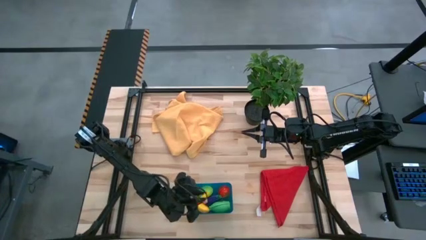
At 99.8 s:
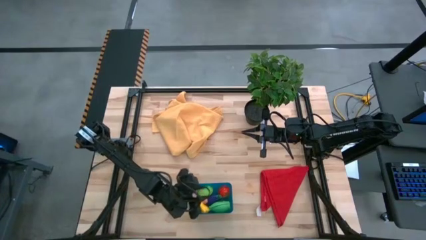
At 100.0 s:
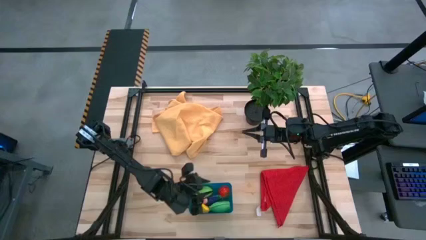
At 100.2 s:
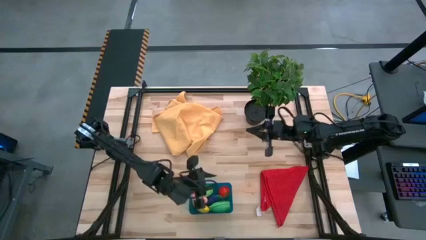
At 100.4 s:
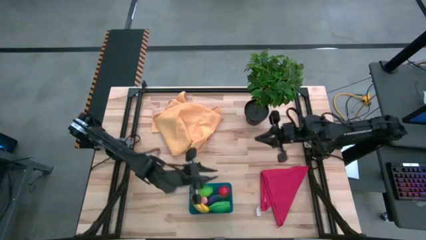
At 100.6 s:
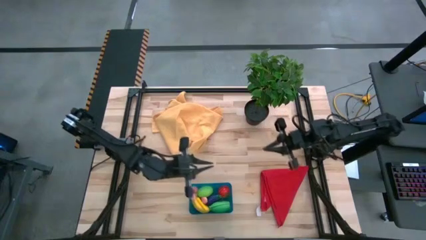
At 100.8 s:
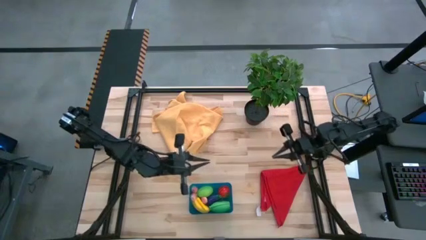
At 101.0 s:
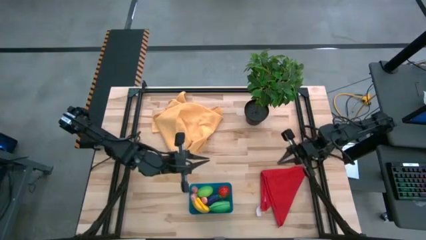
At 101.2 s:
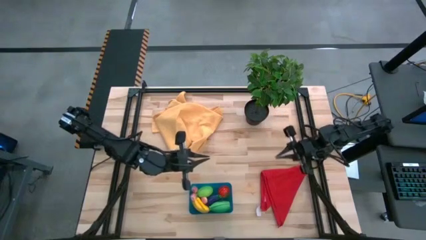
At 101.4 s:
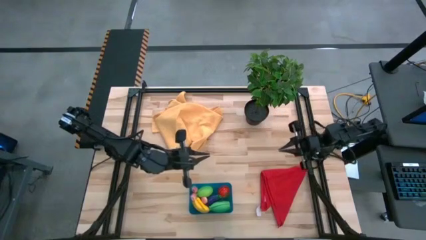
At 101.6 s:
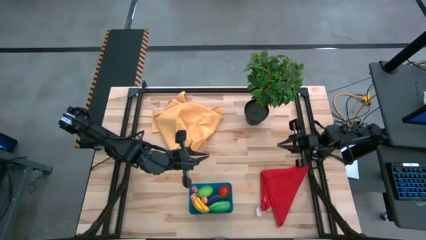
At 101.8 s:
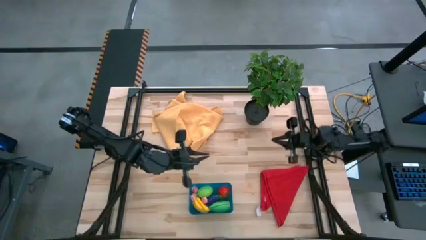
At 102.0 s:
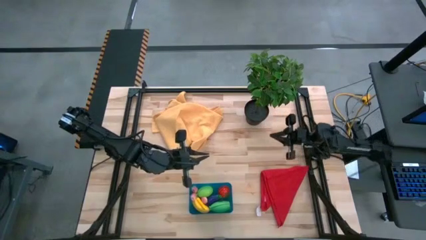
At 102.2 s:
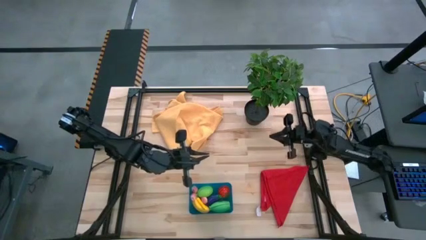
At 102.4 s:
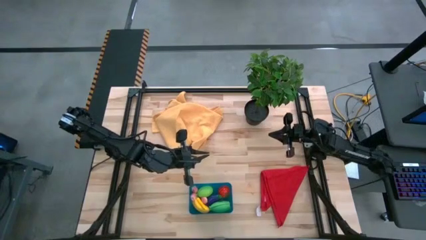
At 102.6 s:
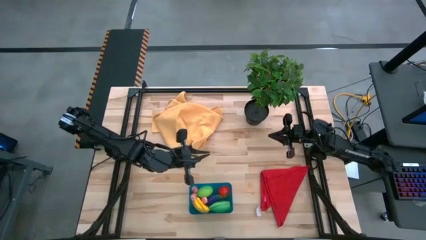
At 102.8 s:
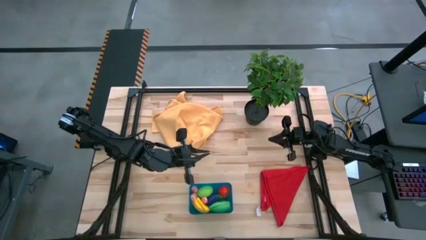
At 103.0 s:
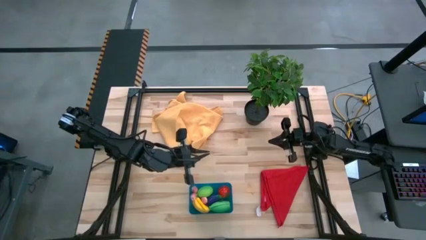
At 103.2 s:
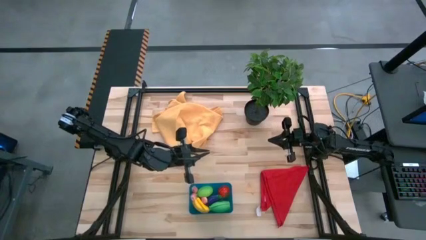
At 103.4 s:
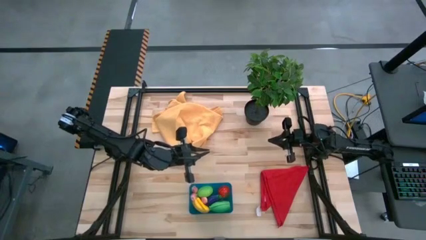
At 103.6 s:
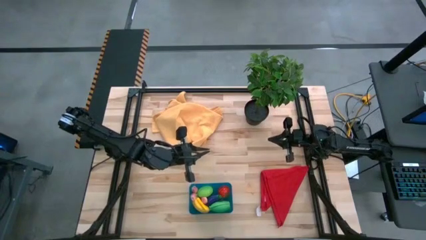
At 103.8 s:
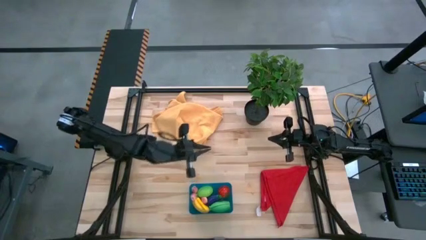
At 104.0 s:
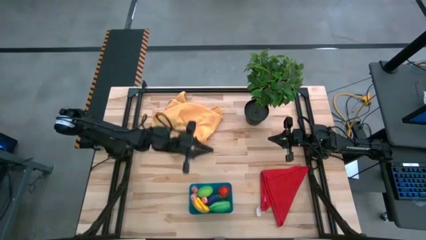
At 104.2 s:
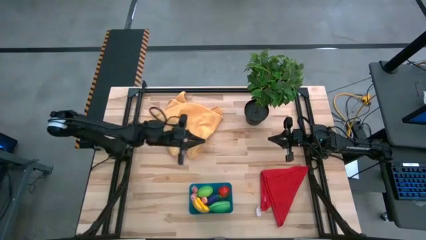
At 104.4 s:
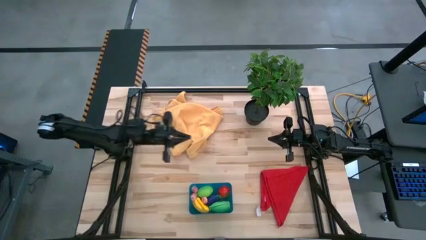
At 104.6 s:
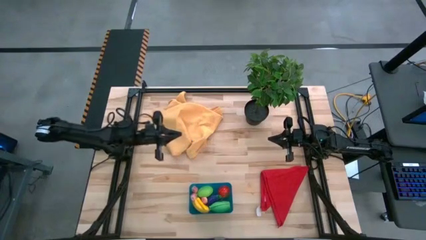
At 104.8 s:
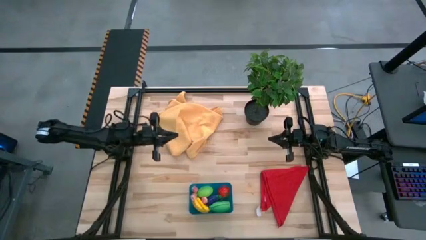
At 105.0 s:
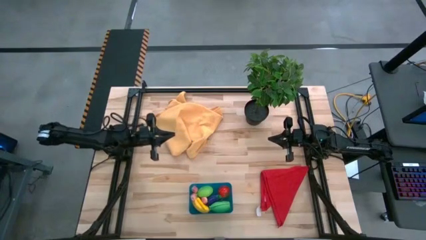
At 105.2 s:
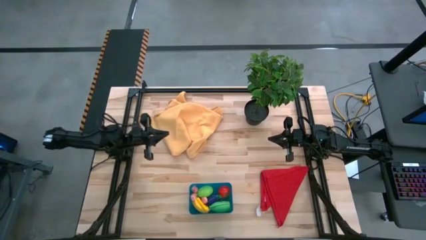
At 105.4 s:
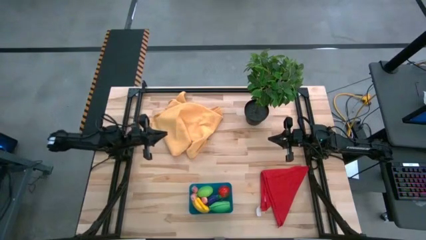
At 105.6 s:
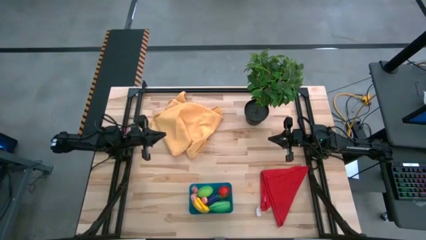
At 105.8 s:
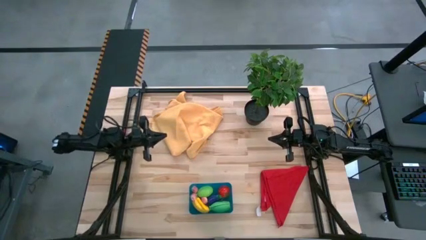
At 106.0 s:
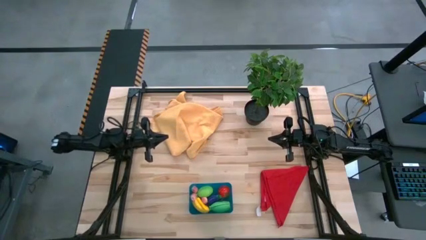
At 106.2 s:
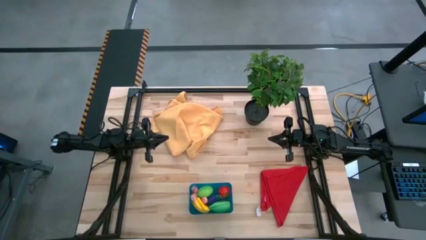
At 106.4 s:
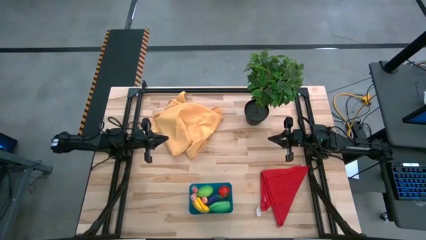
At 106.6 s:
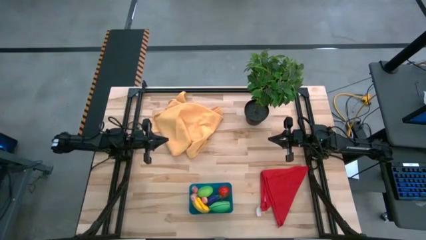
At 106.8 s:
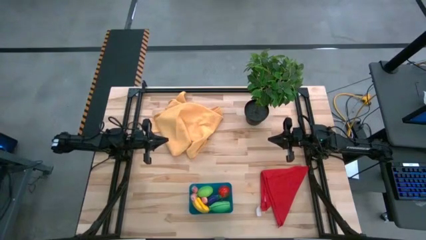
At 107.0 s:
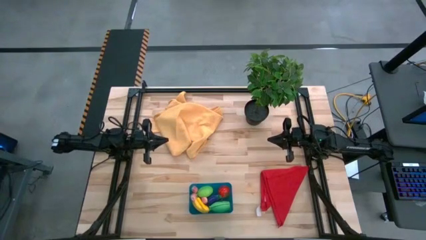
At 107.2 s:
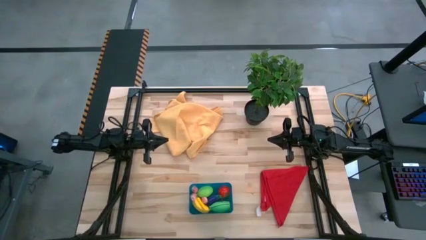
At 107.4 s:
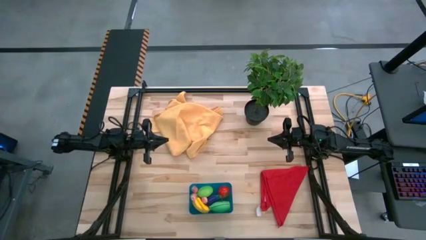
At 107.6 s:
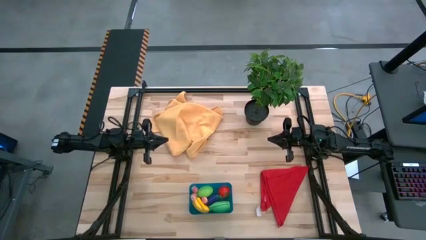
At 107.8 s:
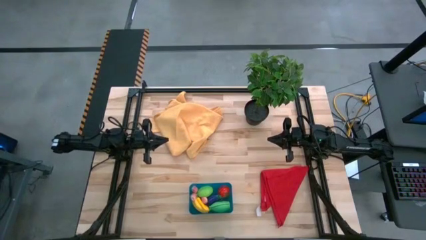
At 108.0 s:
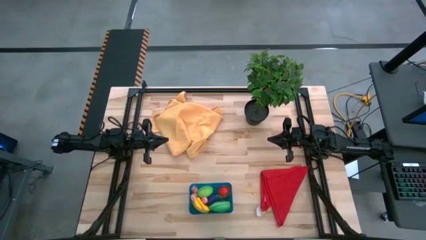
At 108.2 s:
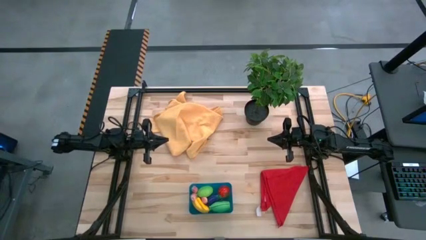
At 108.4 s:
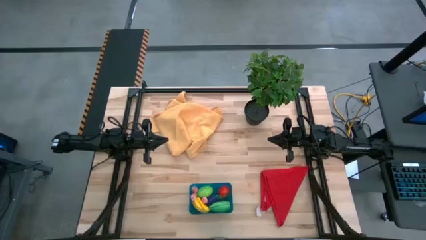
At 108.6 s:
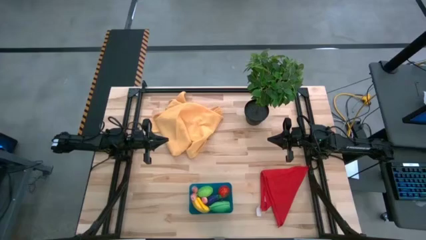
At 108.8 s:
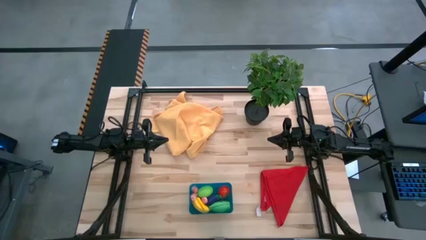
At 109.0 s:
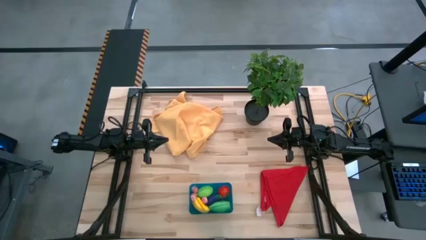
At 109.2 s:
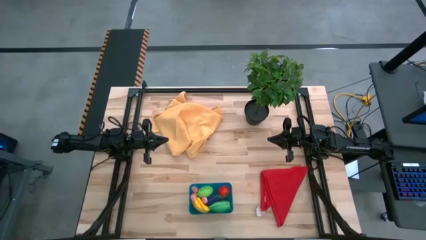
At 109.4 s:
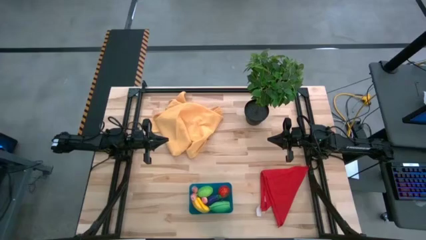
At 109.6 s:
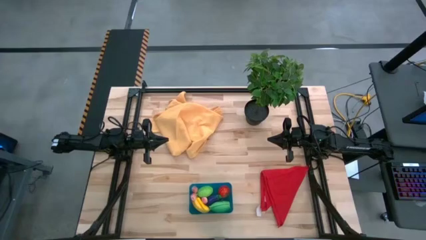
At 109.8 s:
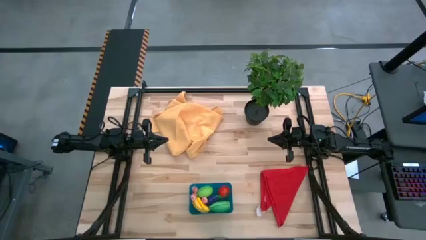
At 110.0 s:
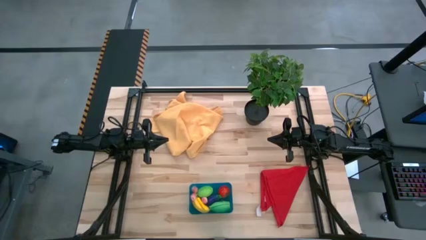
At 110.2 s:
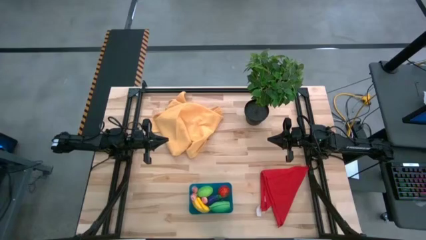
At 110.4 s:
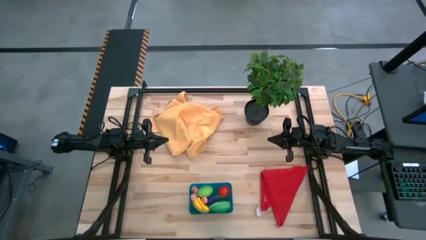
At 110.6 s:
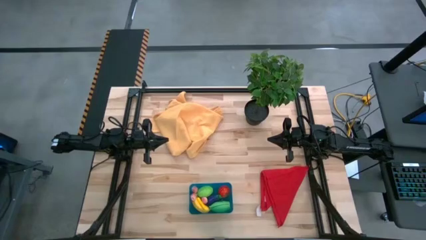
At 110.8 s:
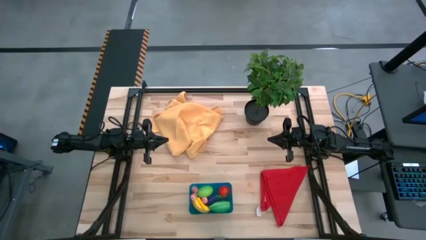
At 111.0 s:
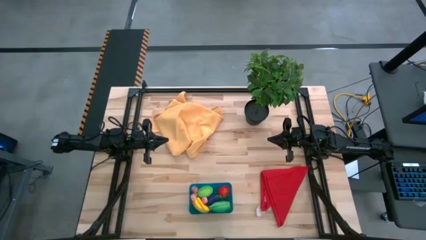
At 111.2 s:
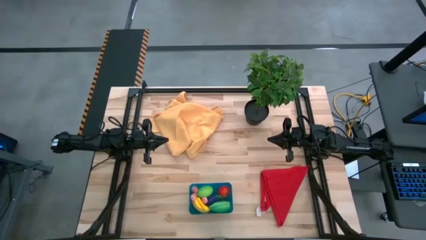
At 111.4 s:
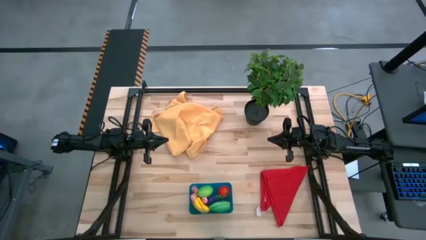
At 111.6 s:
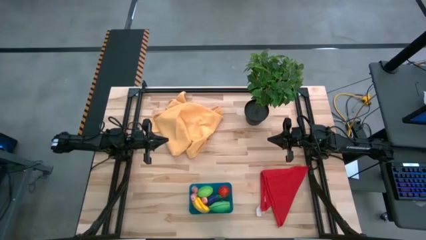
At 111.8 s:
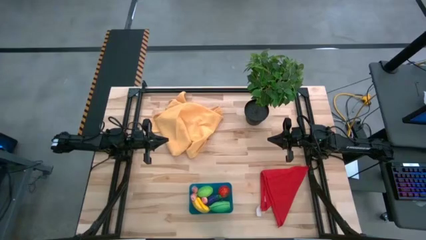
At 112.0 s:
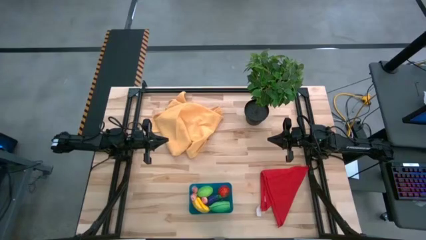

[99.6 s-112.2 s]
Task: Pick and placing Produce into tupperware
Return to Home Position
